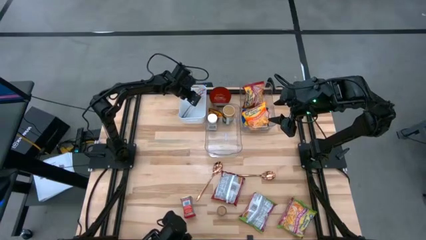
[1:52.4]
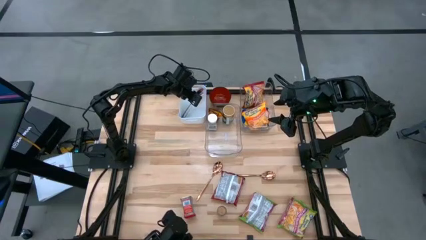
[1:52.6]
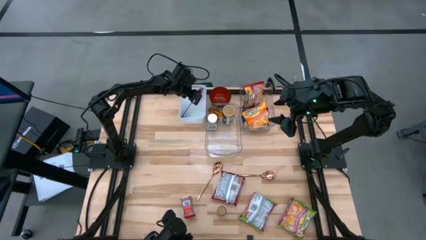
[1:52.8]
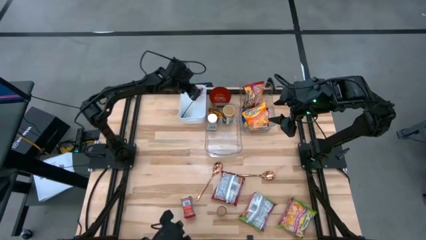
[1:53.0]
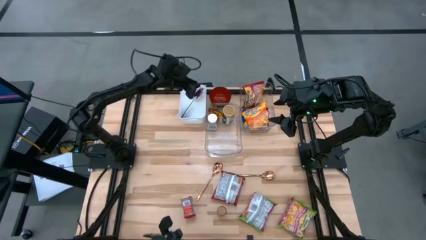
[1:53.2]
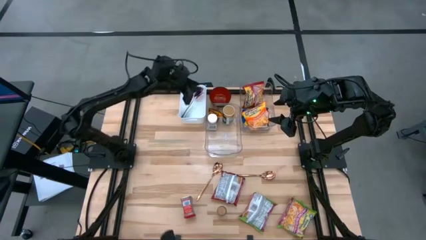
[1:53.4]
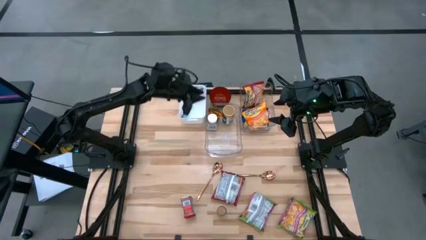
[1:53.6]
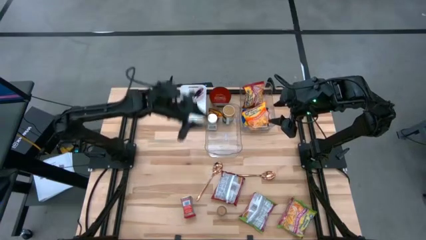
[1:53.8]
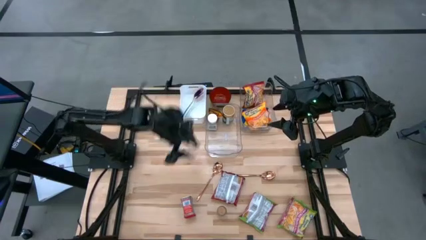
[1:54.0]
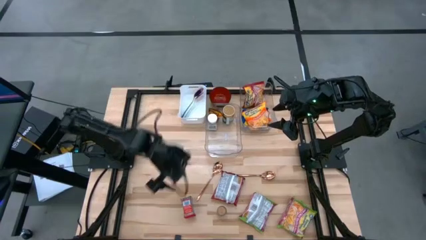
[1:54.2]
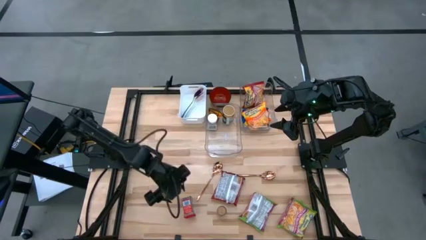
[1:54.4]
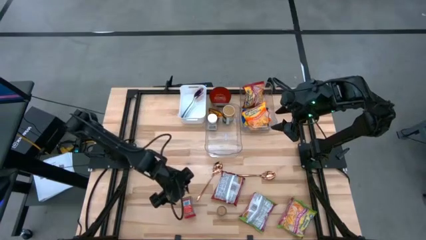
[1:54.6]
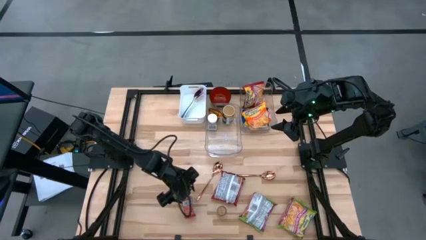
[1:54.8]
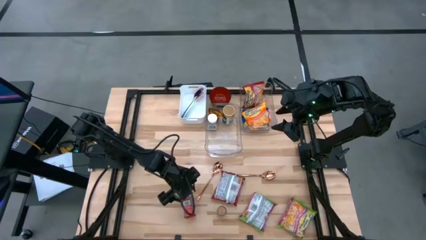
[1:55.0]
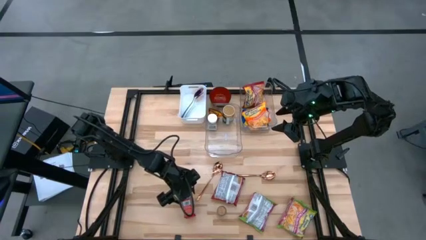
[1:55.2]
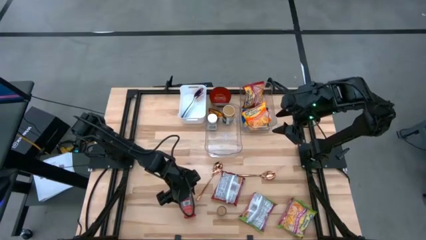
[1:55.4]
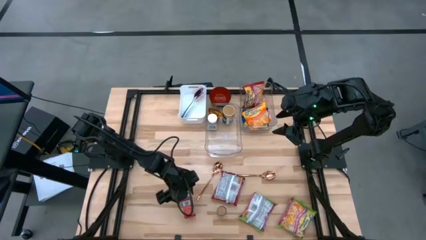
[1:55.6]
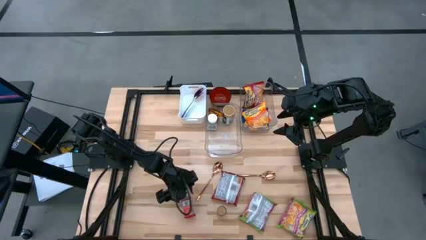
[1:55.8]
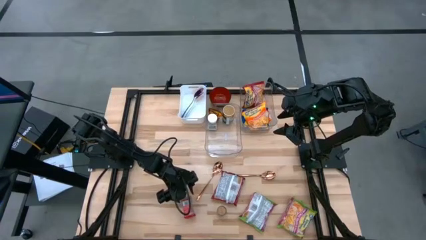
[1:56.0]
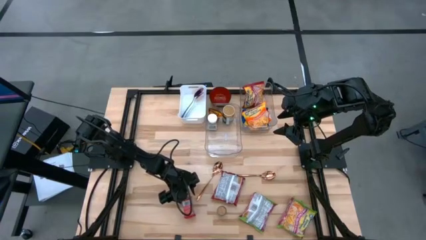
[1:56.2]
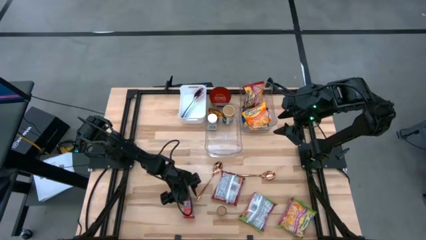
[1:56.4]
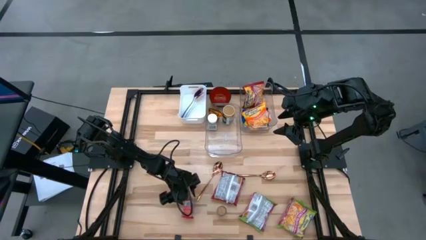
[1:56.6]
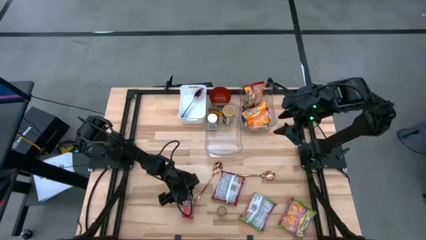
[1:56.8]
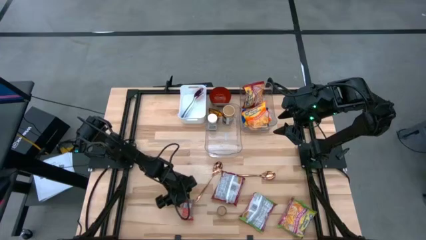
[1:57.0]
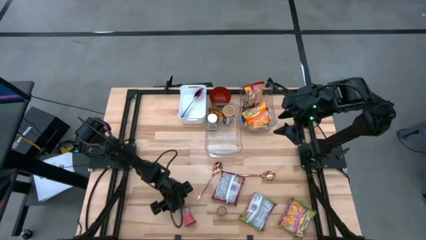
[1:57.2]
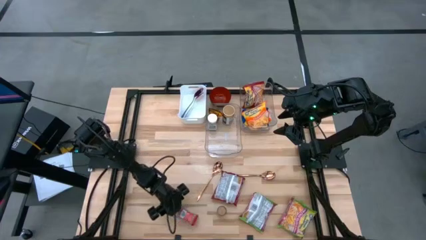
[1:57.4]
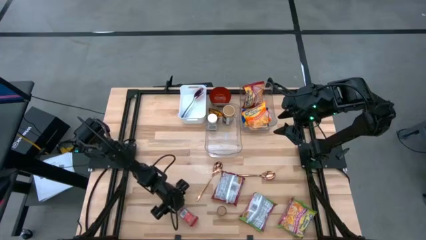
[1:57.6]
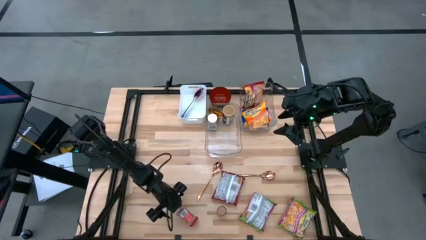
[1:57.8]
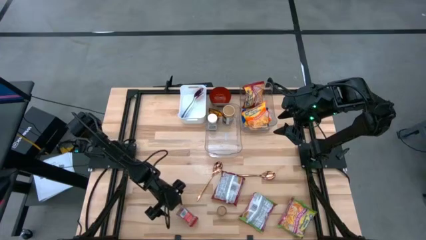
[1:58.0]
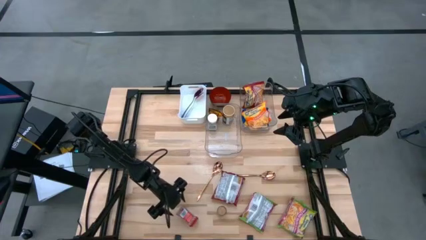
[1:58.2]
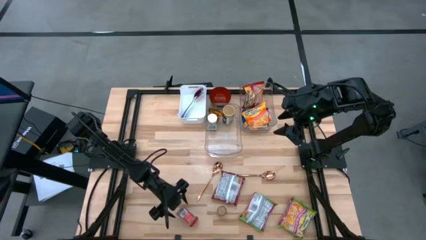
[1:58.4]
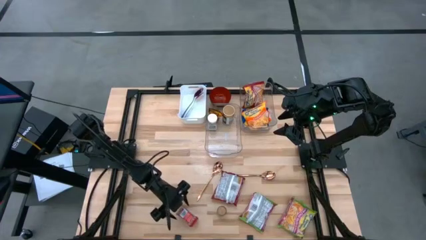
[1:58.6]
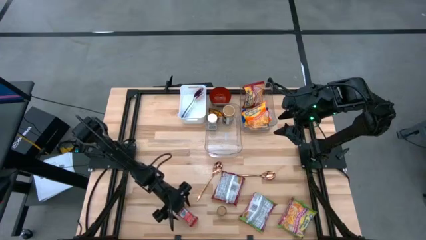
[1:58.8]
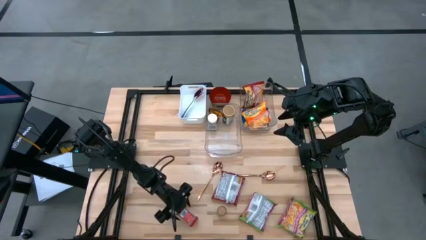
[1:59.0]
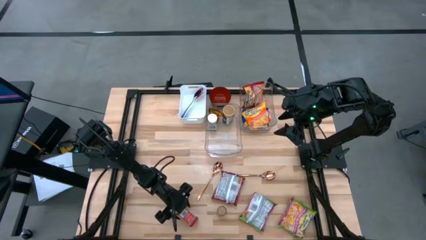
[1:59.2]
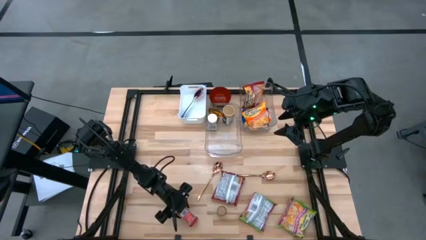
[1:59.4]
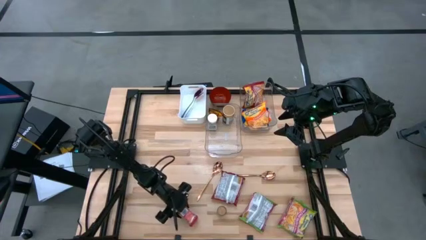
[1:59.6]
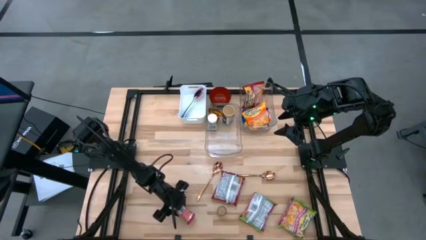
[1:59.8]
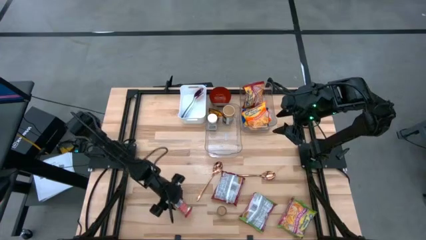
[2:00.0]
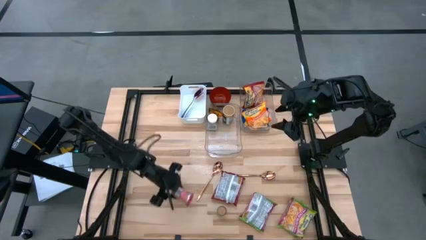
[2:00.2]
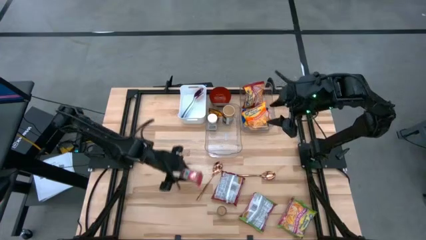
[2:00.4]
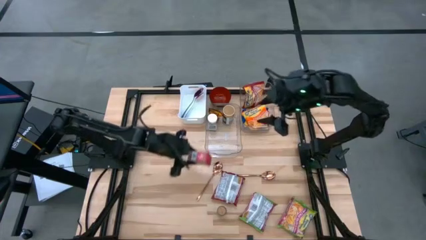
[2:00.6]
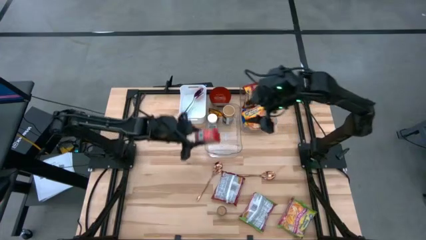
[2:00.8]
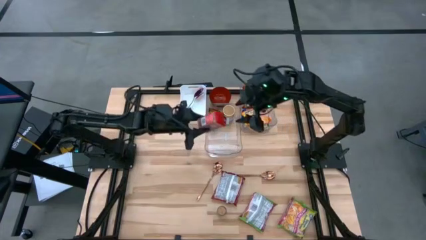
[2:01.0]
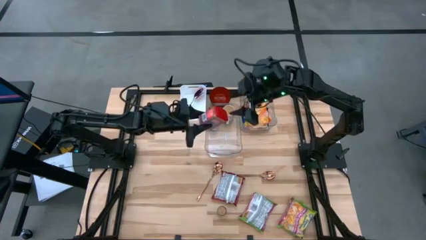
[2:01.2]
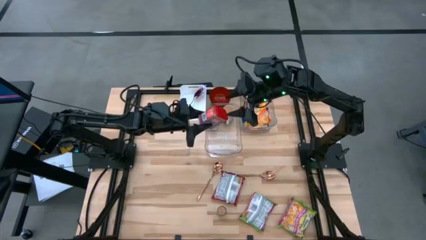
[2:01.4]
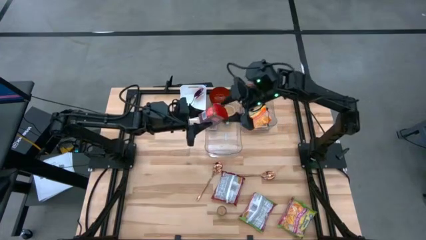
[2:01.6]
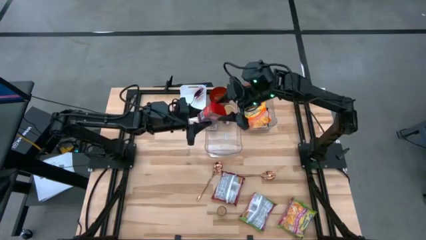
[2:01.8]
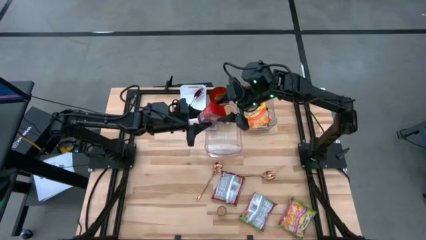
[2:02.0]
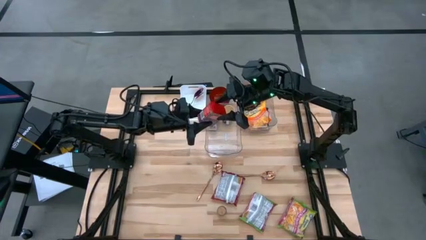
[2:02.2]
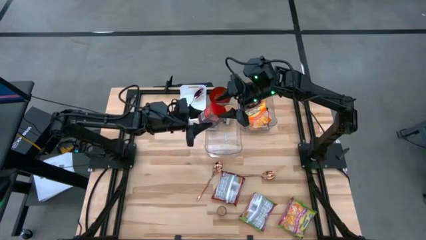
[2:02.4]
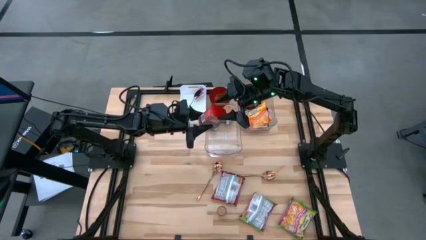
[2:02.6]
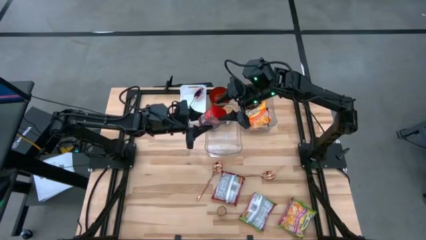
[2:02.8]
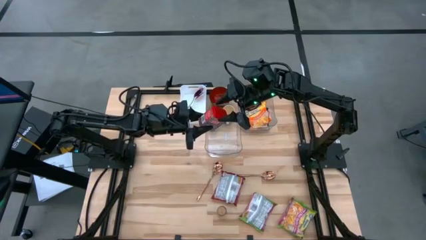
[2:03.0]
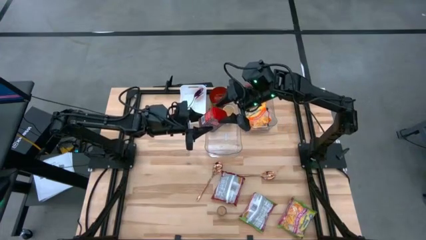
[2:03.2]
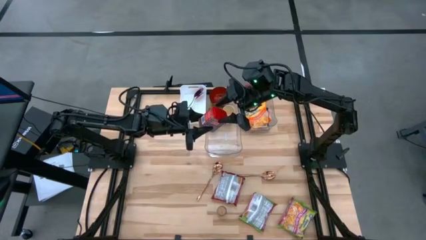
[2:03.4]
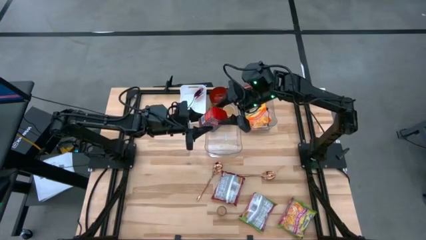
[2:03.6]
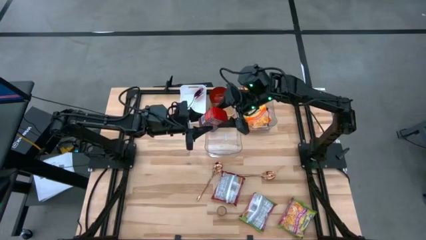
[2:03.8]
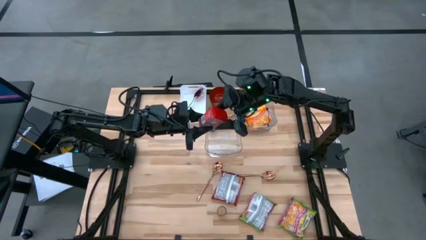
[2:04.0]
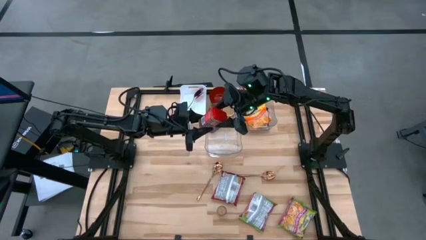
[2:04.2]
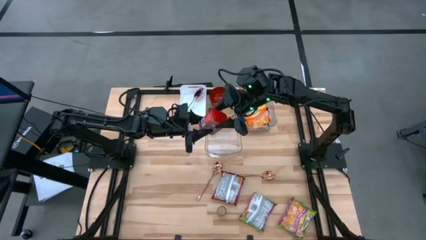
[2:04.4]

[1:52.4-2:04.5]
Task: Pick & Place Food Item
Put the red spice can into the left transparent bin
